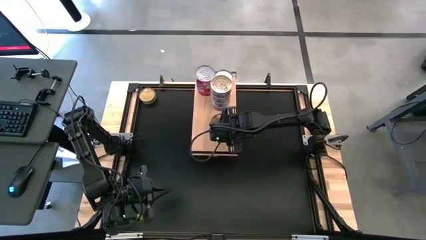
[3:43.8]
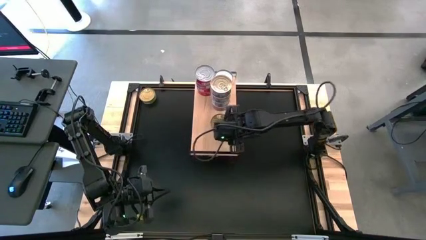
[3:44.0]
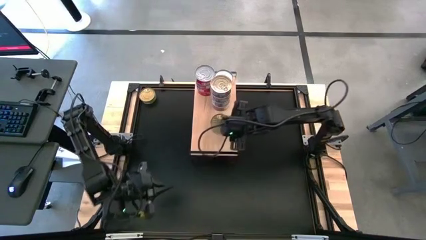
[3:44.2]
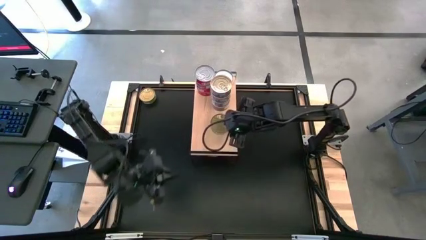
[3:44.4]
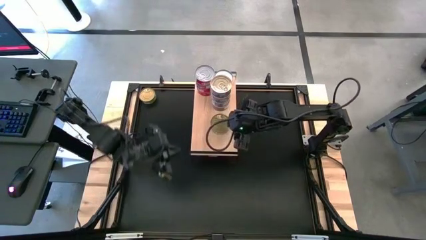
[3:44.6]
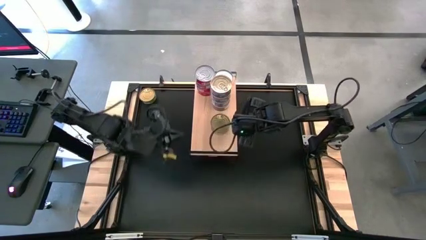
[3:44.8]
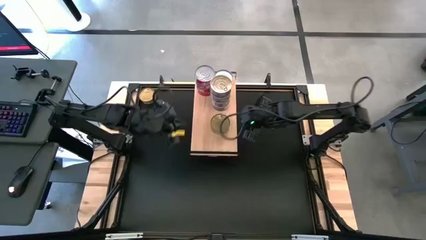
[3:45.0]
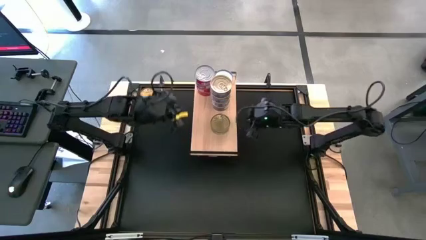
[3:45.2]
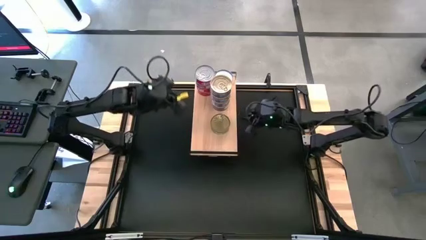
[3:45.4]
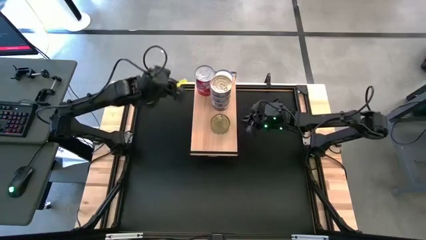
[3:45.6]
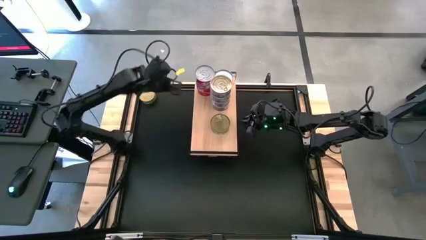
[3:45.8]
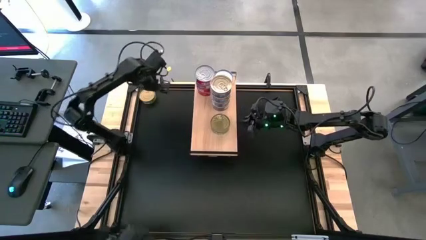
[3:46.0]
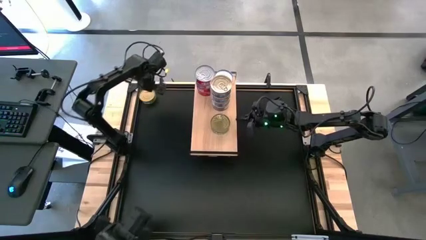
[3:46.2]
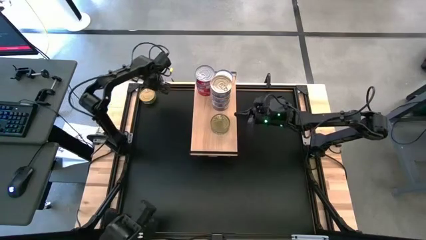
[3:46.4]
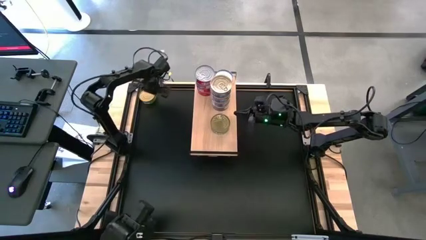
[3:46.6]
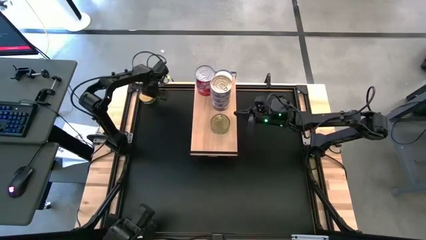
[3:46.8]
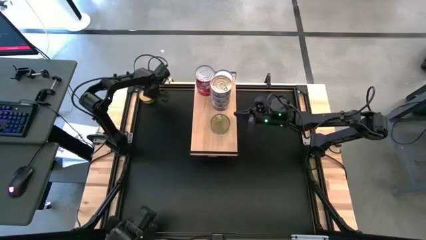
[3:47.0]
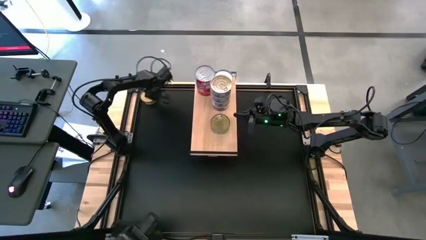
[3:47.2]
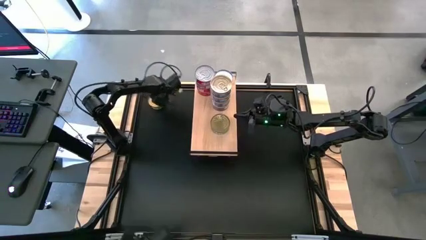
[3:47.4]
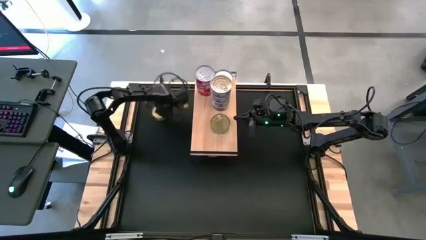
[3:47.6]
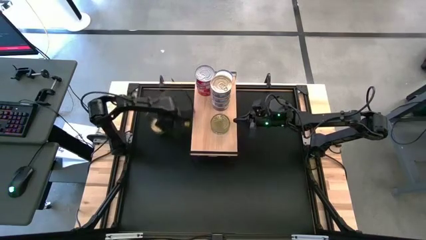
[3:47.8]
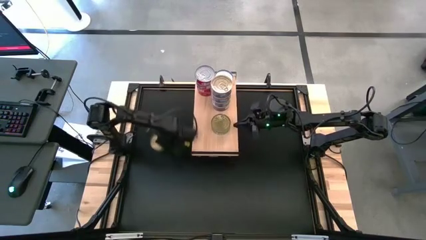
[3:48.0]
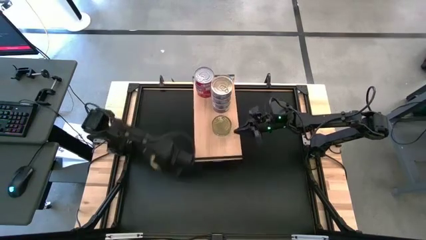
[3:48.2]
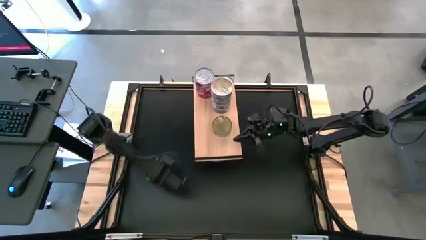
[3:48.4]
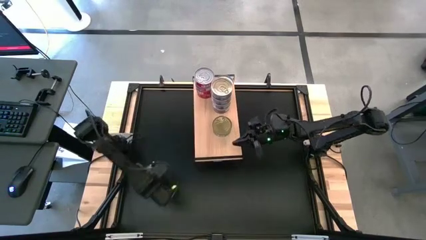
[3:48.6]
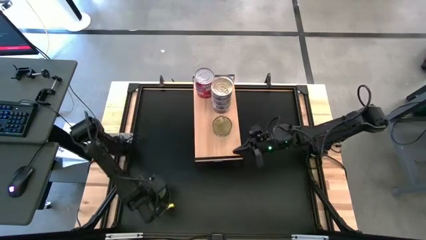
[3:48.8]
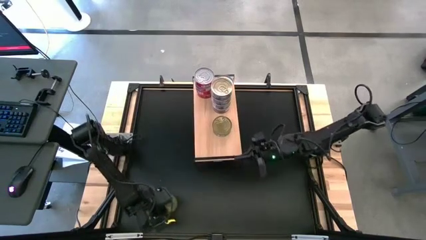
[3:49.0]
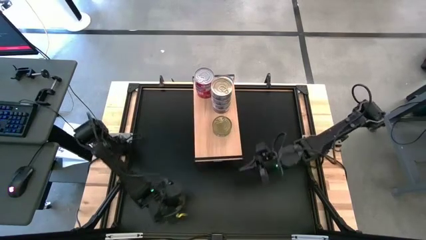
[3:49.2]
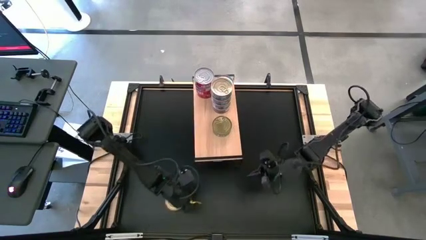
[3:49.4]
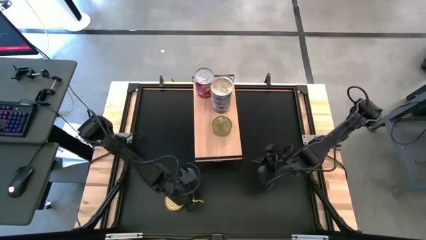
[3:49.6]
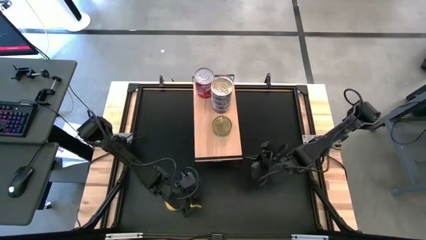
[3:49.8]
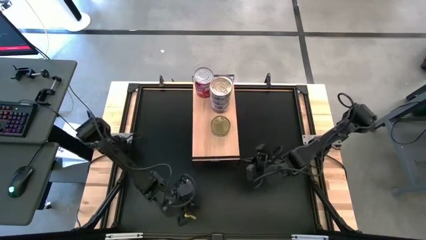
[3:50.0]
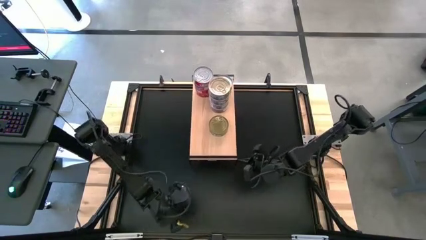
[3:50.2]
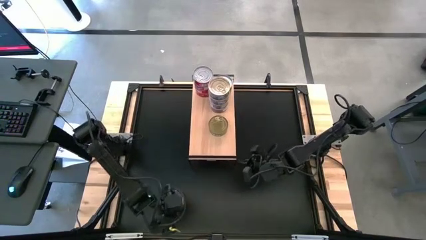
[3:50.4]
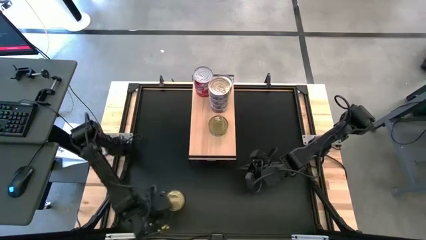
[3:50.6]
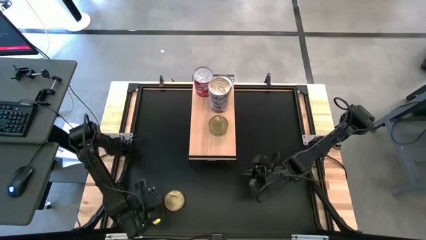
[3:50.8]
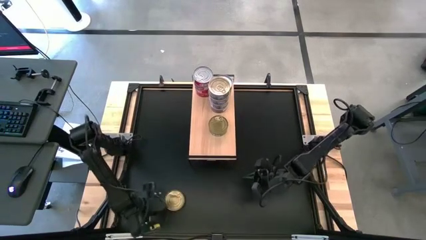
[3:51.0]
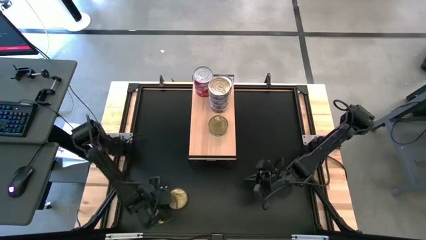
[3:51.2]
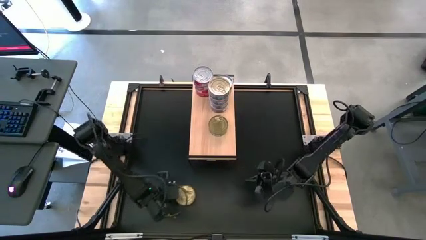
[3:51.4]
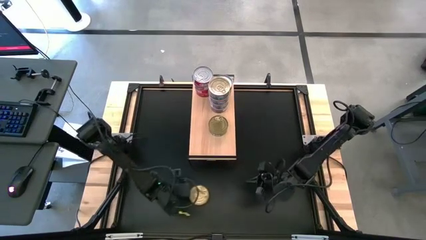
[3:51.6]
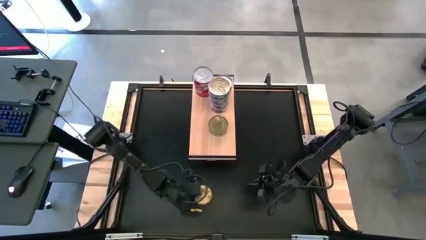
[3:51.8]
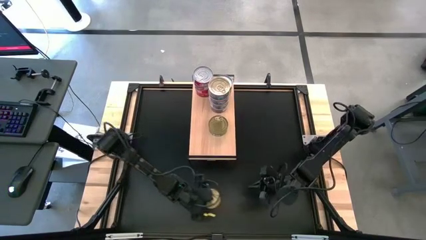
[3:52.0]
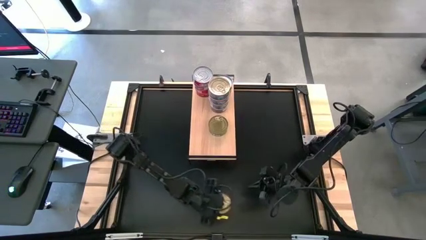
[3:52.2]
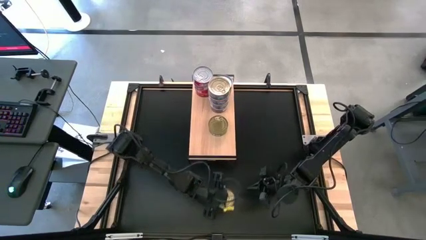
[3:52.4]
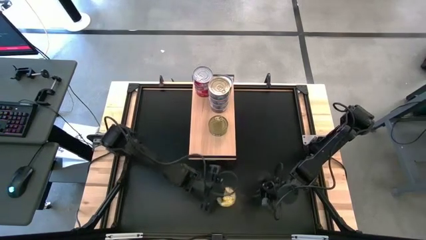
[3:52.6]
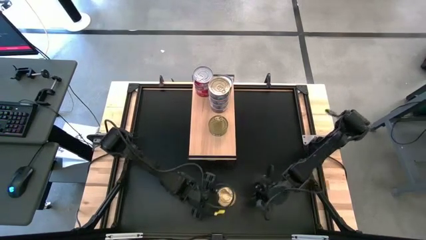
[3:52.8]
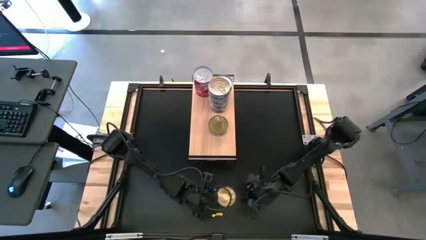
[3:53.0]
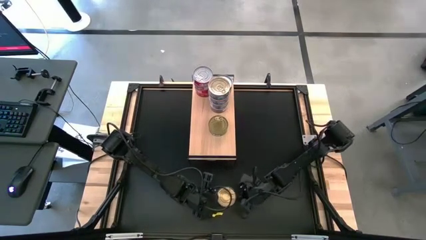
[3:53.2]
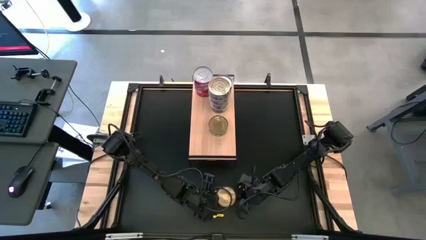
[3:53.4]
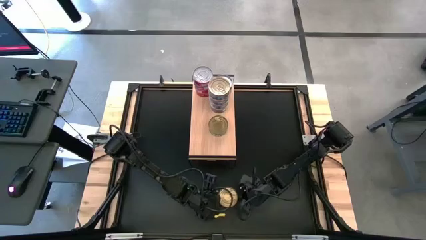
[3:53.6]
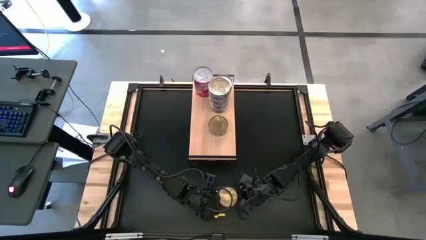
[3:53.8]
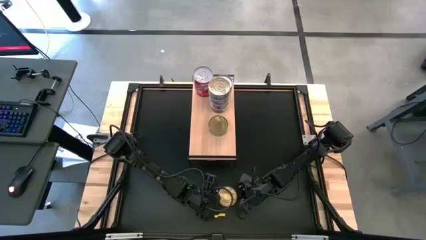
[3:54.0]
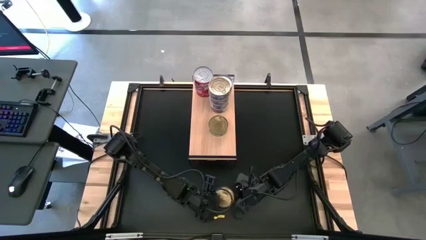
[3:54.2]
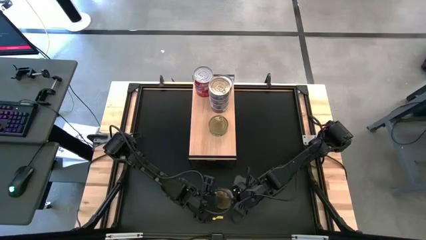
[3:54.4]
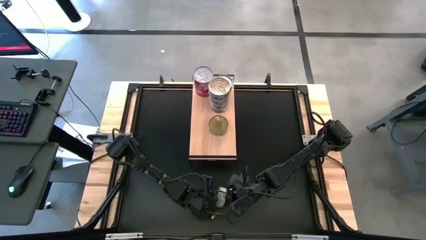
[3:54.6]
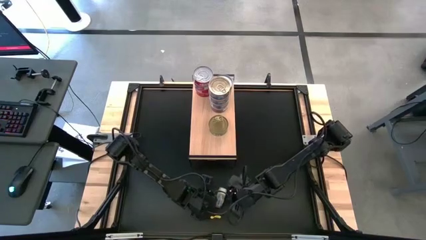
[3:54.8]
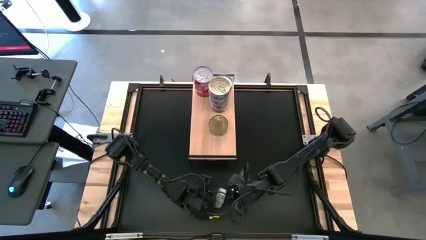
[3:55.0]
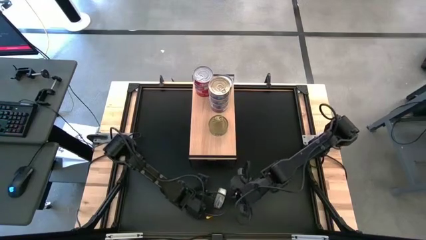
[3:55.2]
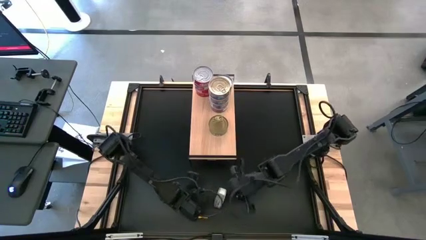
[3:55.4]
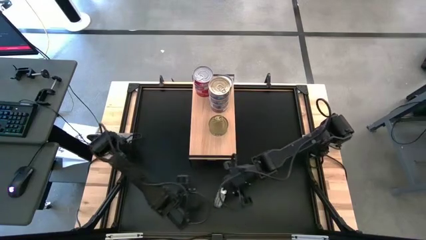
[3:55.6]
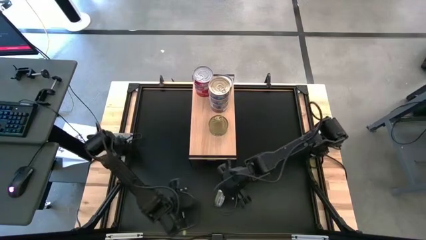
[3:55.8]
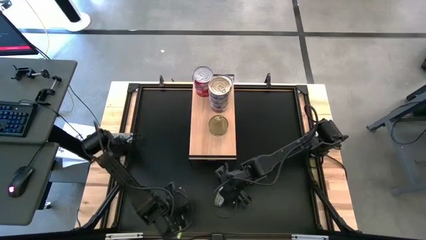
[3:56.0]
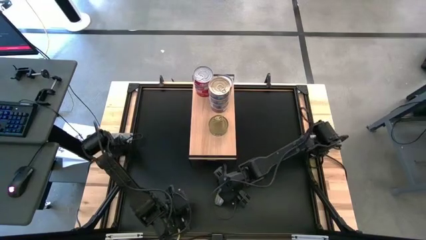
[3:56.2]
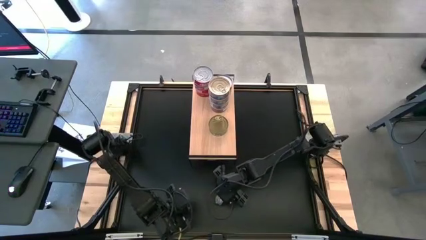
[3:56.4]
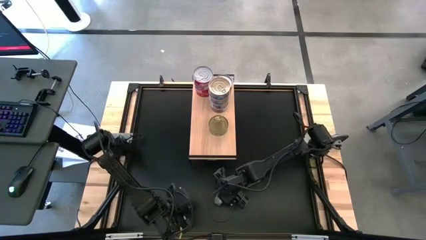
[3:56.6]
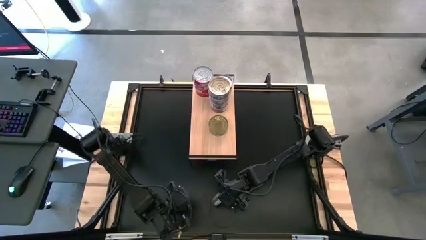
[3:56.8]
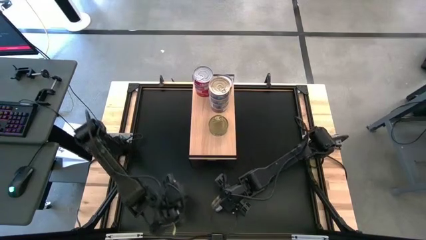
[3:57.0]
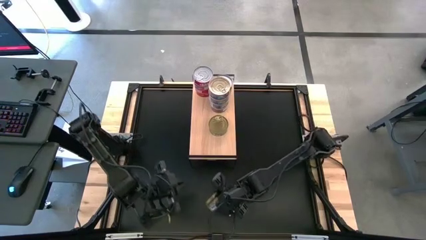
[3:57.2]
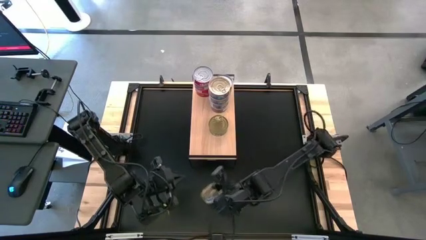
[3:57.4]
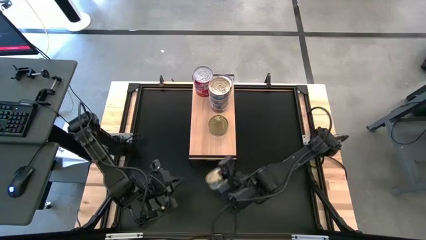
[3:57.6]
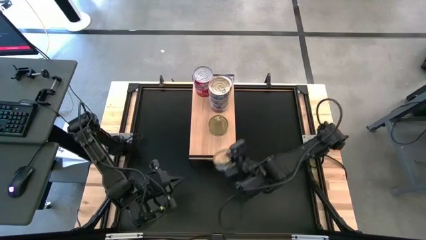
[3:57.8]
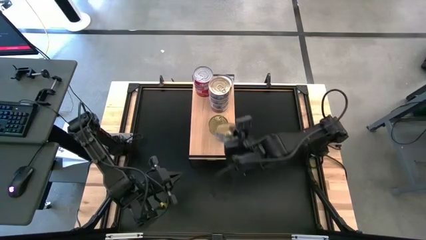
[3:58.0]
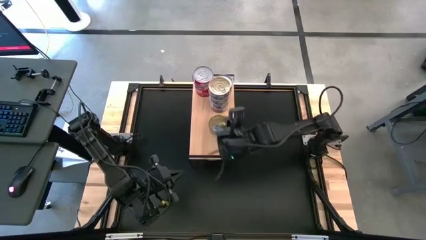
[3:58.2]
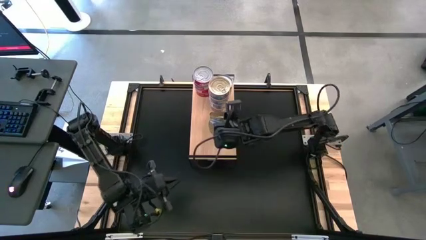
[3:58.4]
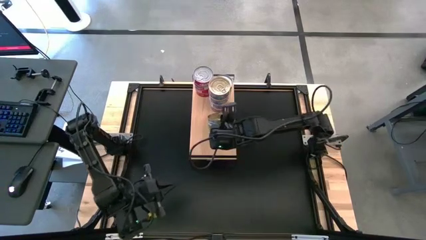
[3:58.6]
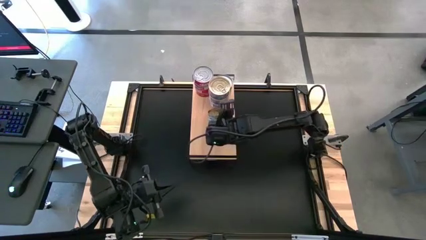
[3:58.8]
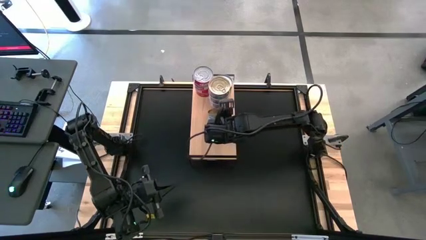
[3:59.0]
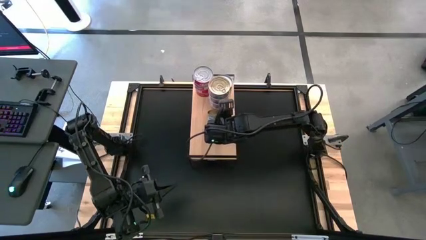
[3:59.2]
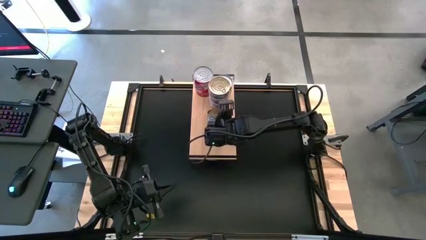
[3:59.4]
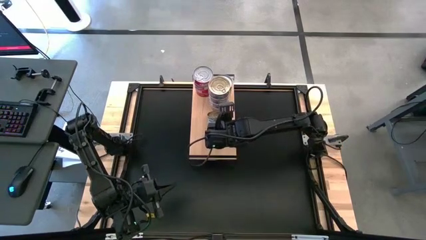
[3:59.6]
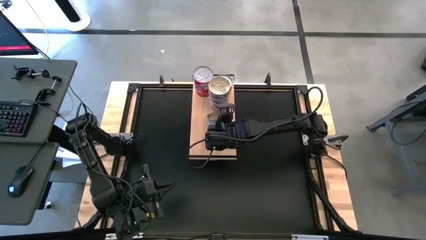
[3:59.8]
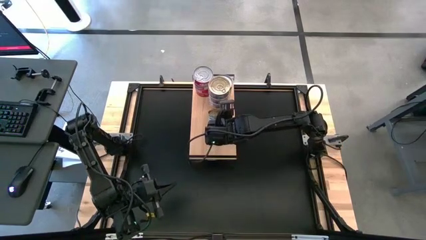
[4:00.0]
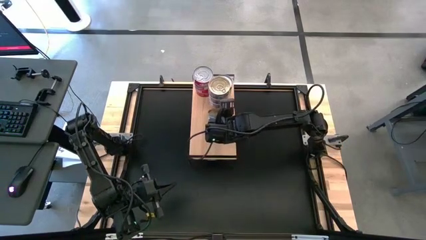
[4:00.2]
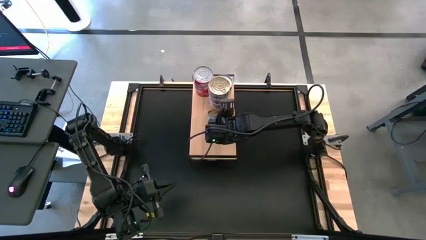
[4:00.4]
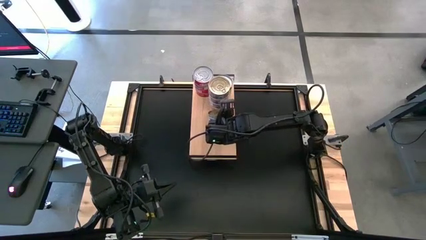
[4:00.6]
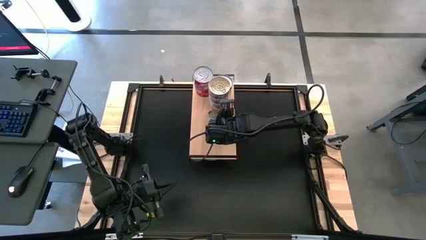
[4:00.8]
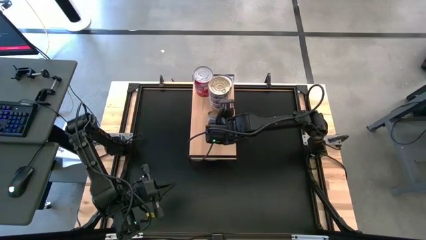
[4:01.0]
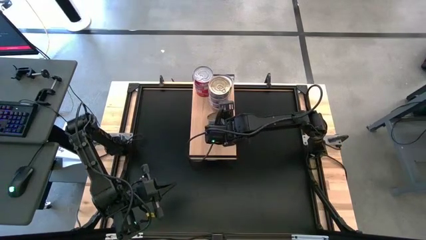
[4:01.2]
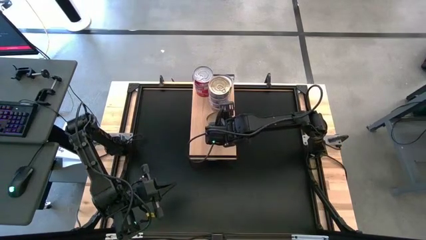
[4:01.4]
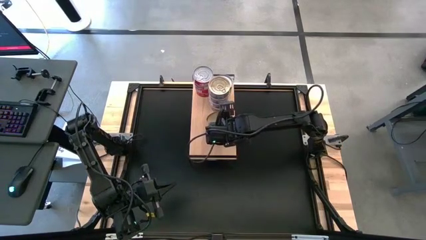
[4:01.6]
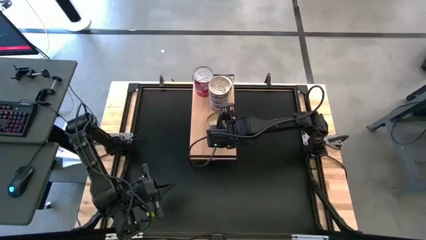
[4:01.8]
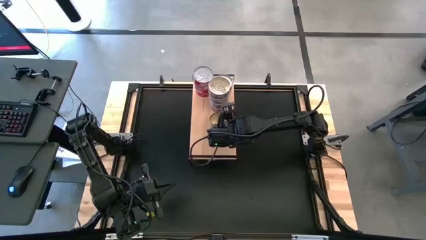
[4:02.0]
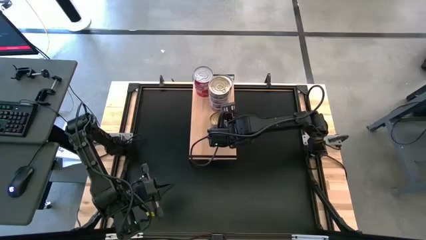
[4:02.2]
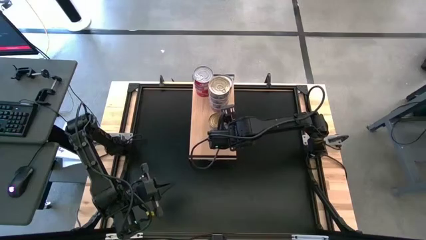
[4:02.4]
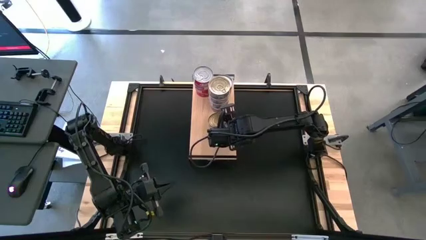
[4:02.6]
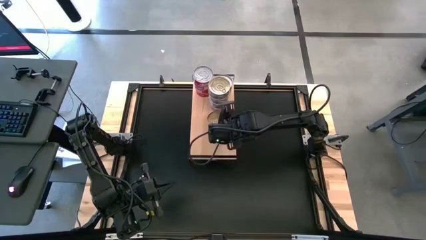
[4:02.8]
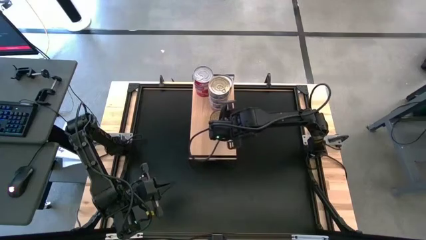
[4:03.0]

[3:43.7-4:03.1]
Task: Stack canned seafood by type on shelf
Stack the green tuna on top of the green tuna can on the shelf
